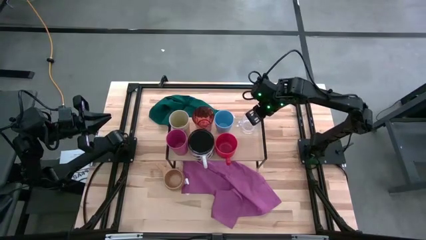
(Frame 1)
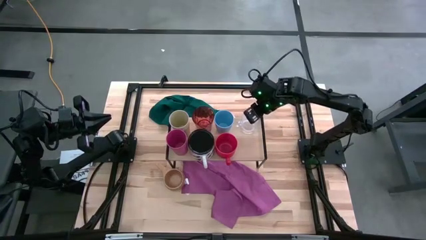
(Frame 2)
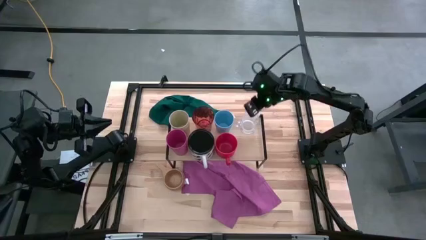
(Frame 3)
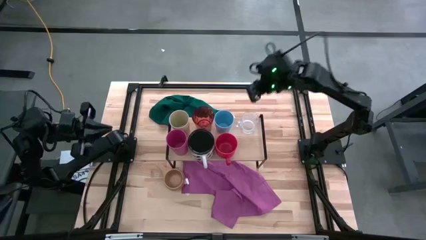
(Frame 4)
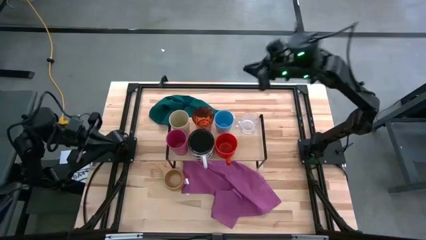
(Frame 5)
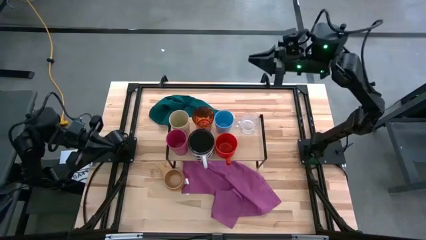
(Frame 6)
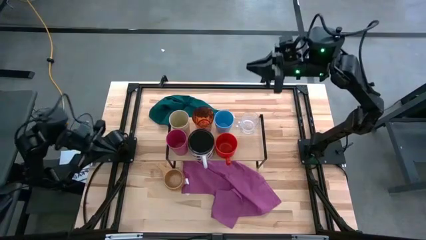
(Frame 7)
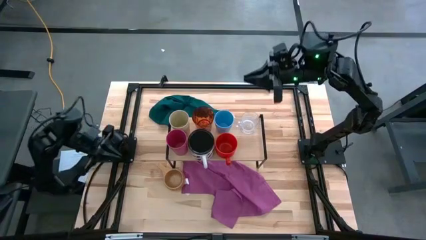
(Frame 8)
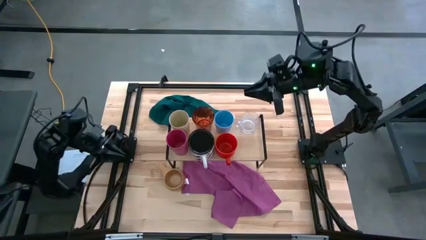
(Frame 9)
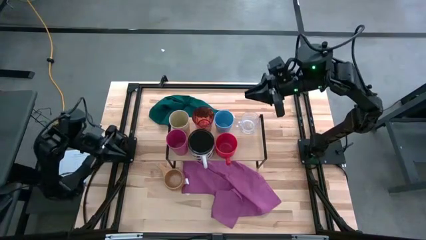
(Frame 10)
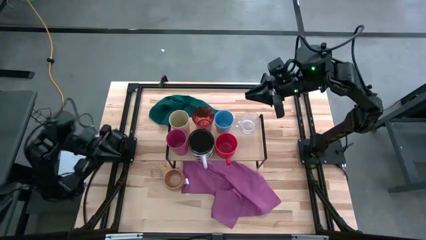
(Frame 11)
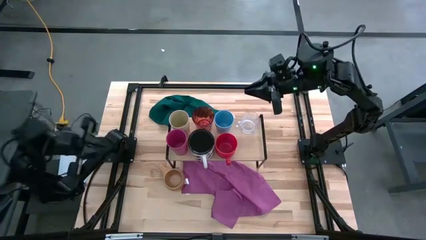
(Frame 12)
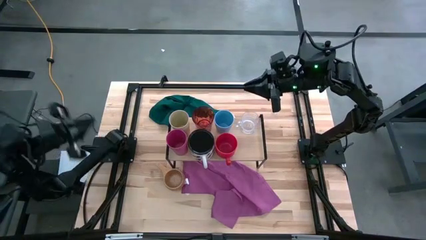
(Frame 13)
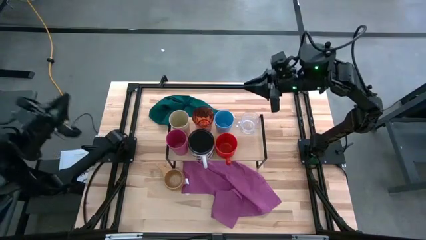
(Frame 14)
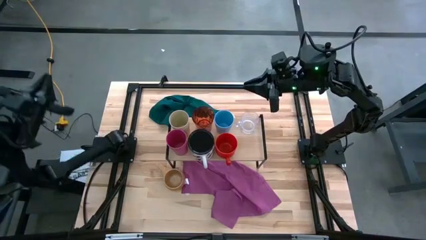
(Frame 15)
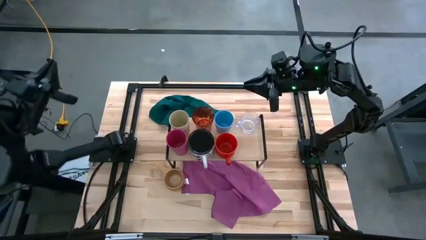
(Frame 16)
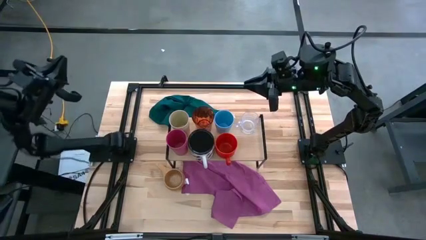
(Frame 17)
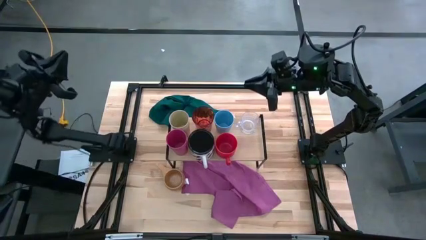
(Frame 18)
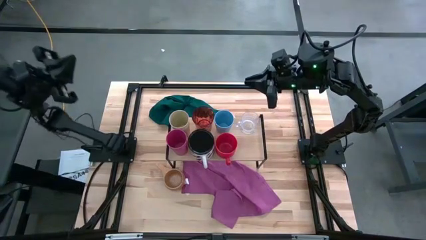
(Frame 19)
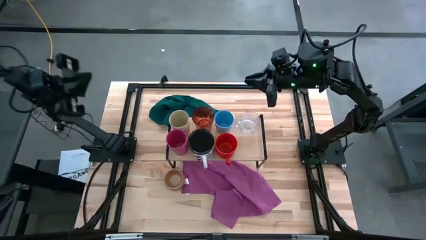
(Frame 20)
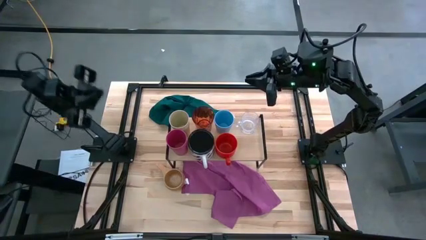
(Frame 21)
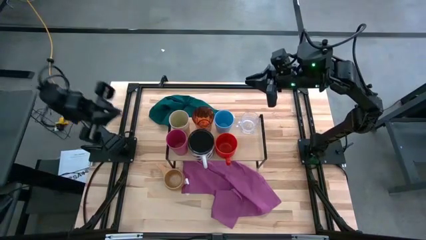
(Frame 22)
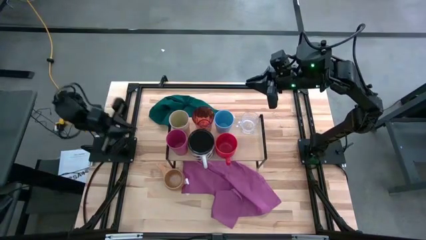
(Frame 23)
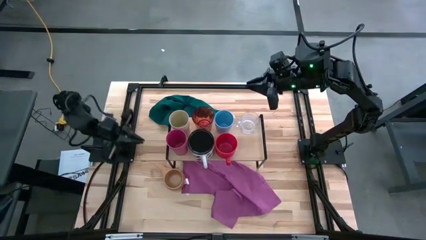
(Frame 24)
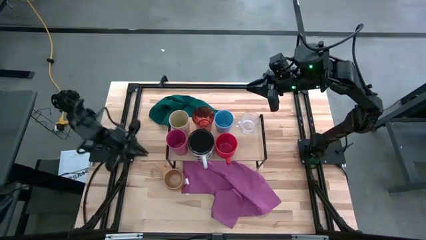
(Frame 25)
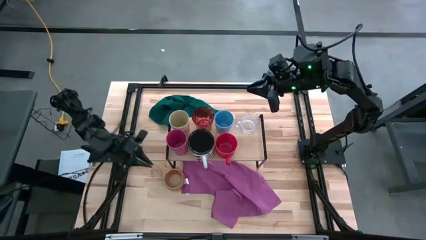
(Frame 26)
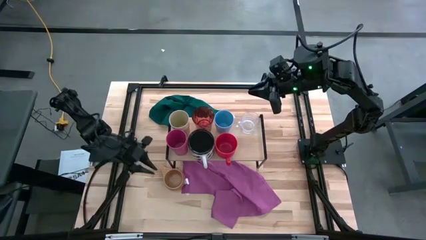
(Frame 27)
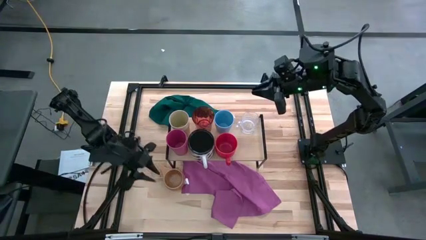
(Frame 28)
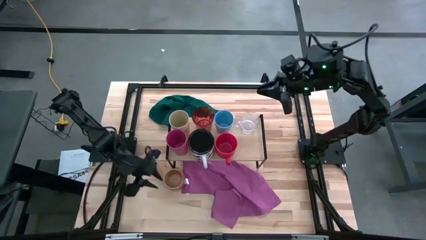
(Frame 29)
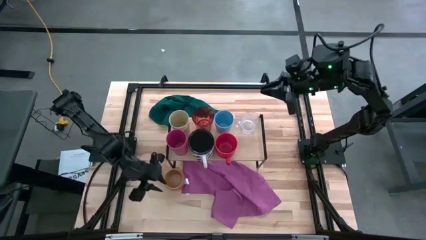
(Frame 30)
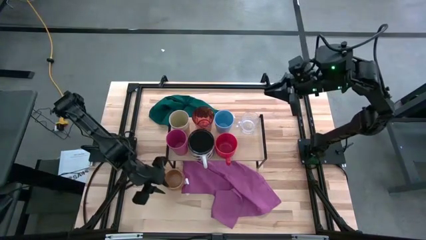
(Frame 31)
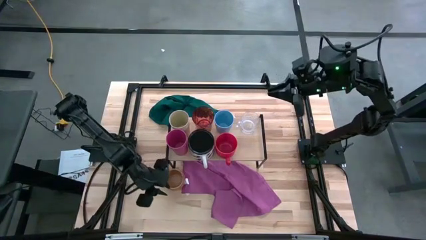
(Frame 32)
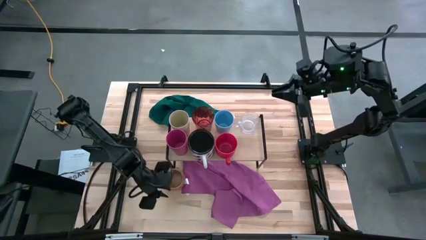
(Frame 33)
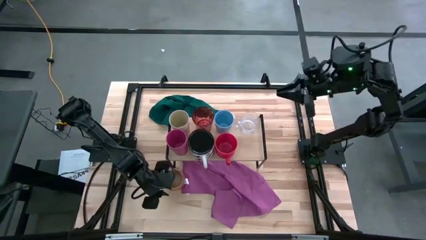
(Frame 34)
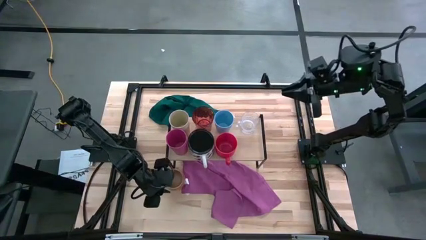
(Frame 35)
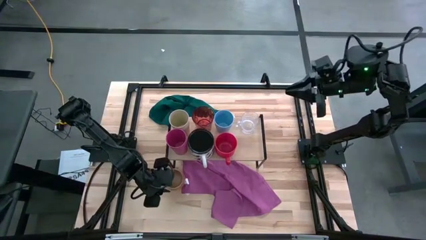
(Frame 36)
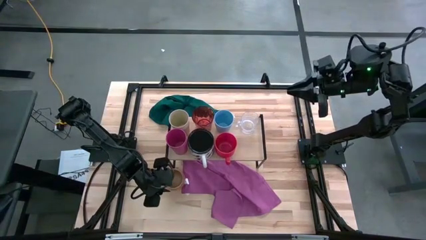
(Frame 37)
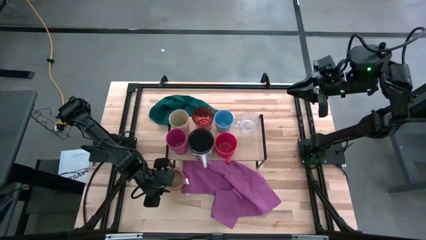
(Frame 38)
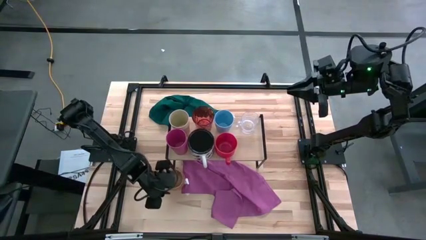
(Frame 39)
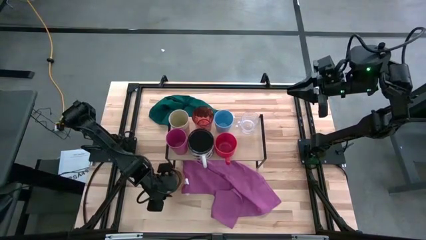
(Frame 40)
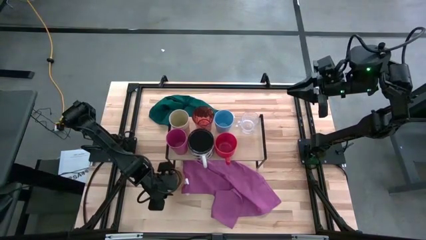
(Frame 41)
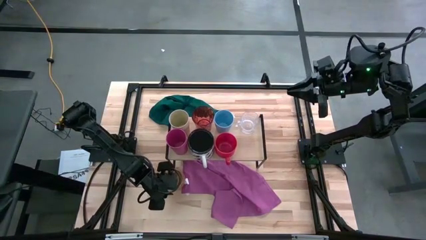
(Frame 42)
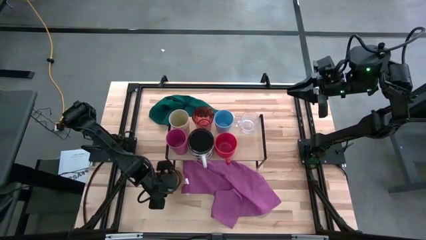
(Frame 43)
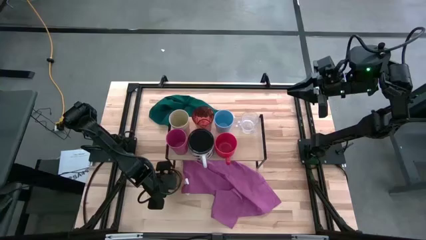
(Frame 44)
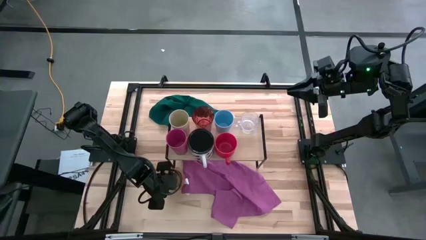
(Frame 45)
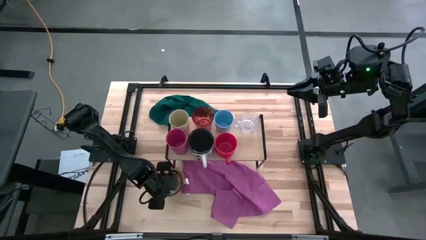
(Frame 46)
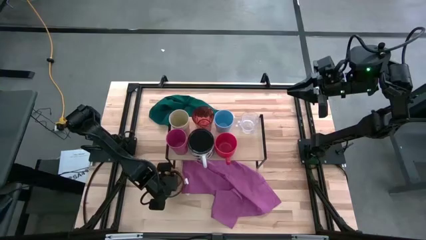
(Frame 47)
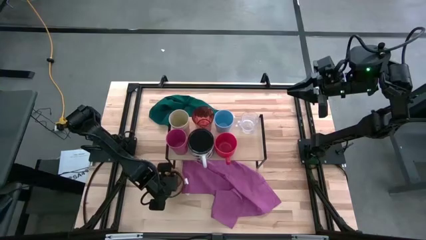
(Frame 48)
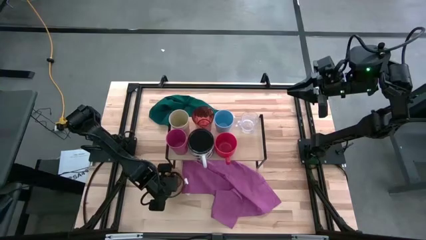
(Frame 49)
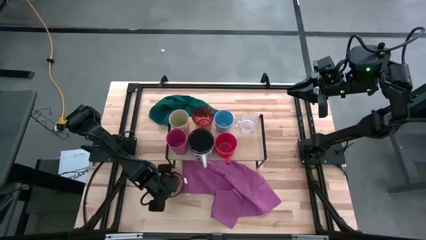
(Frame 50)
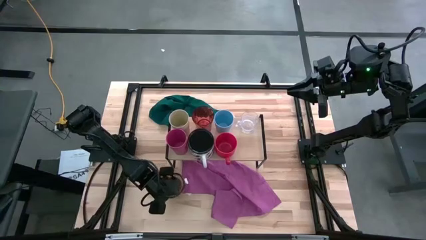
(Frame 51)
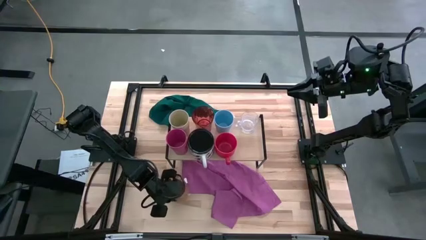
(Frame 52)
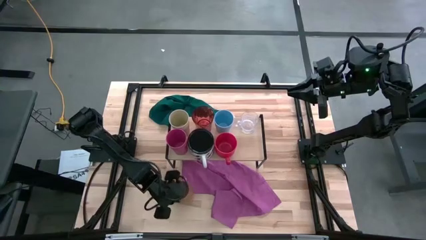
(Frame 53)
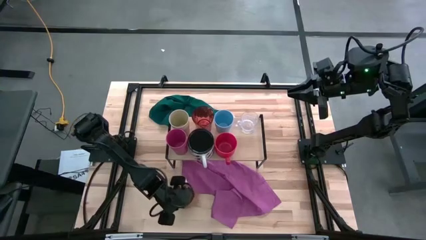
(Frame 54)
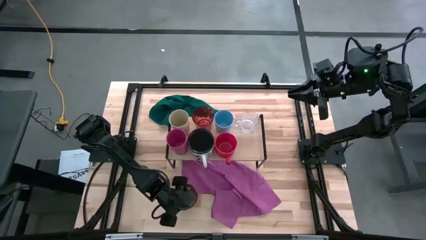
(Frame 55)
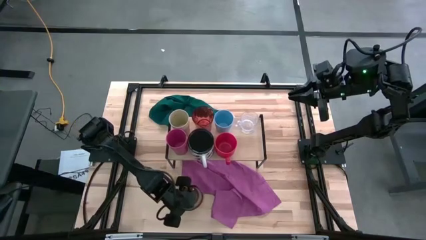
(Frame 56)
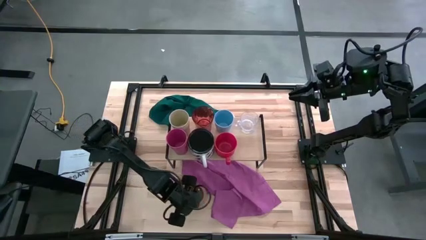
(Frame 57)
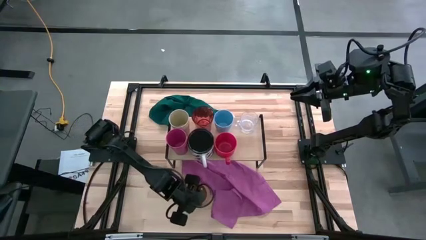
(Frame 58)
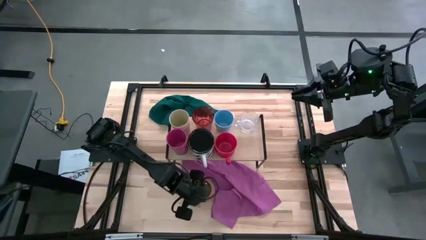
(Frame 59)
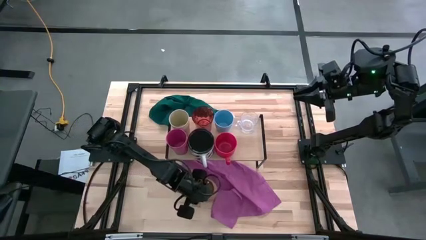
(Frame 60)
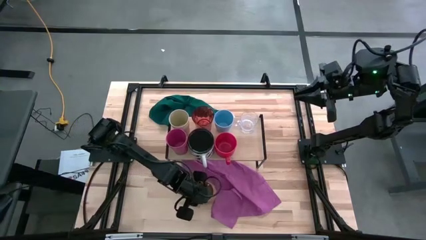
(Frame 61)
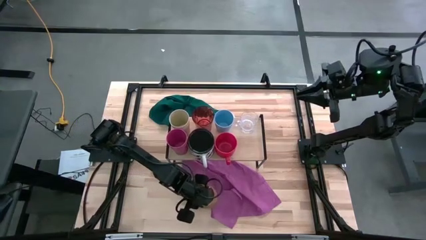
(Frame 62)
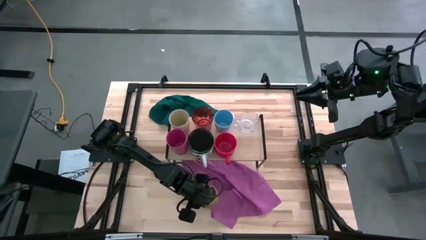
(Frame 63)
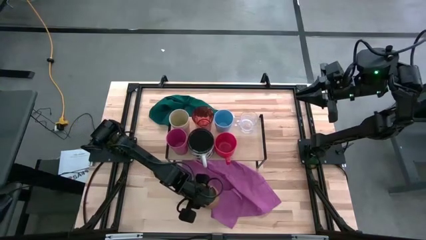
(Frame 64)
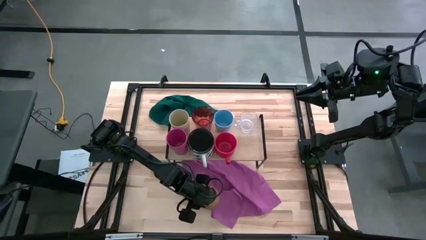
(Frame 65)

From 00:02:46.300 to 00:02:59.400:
Task: Stack small to large cups/mugs on shelf
Put the brown mug on the shelf

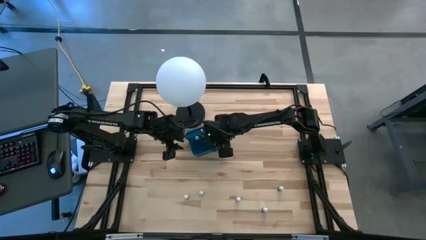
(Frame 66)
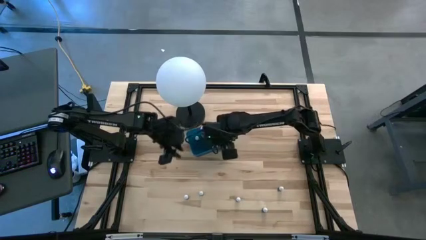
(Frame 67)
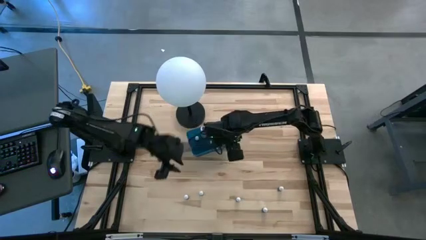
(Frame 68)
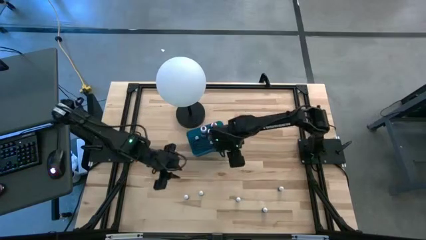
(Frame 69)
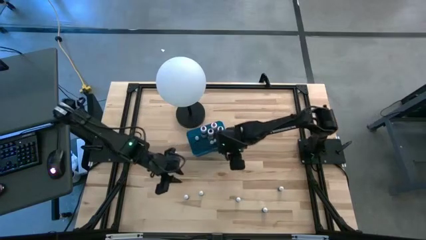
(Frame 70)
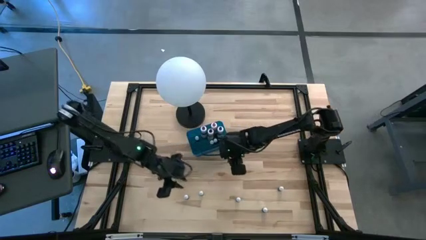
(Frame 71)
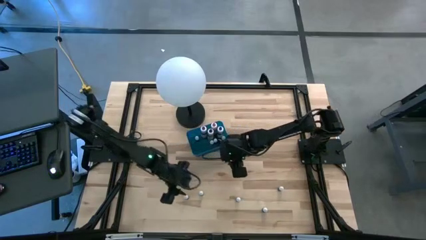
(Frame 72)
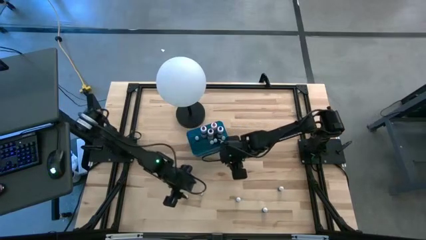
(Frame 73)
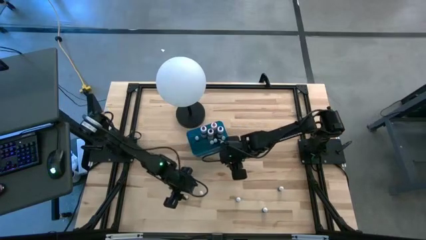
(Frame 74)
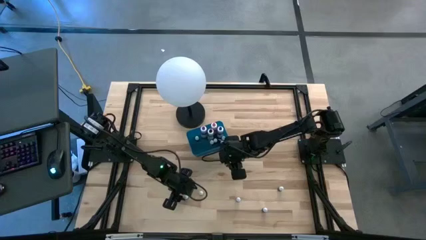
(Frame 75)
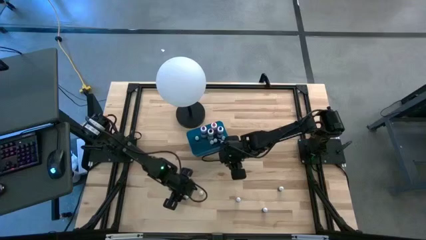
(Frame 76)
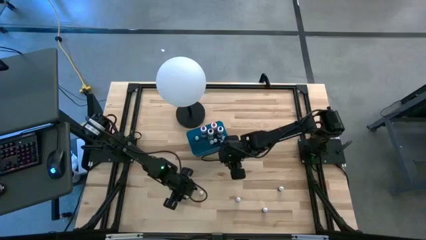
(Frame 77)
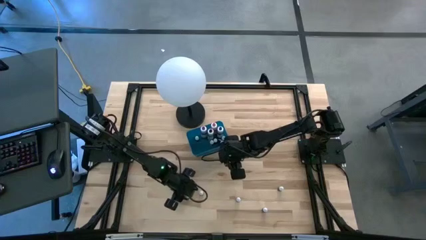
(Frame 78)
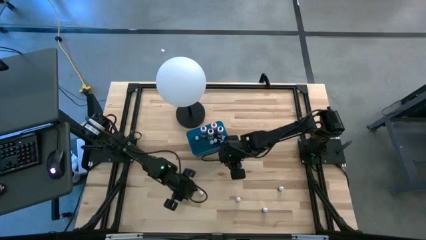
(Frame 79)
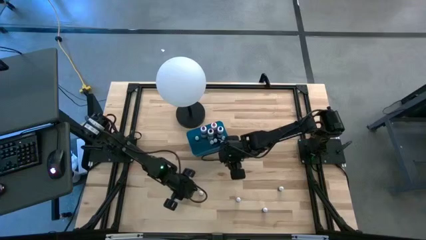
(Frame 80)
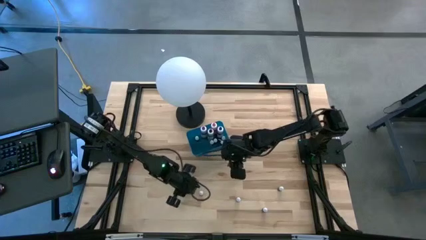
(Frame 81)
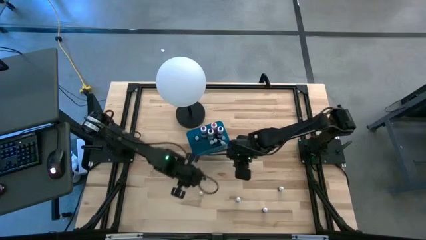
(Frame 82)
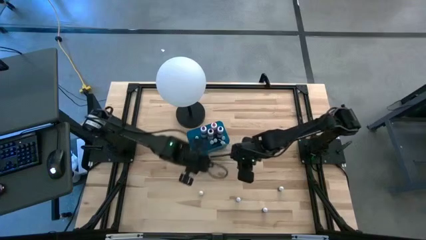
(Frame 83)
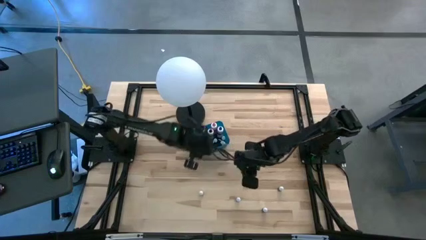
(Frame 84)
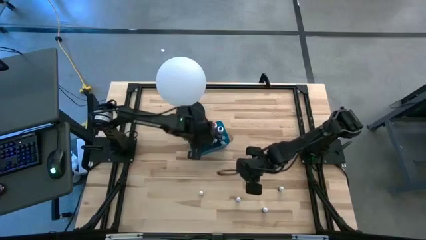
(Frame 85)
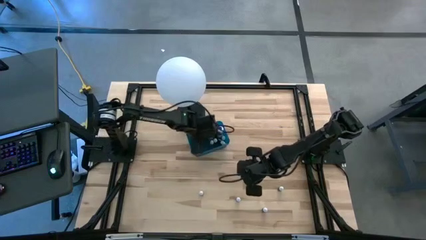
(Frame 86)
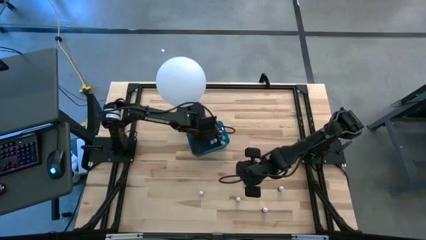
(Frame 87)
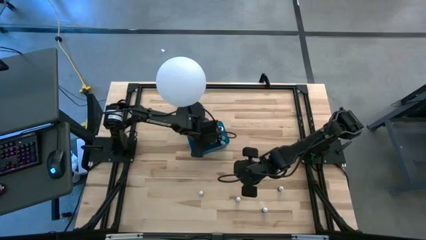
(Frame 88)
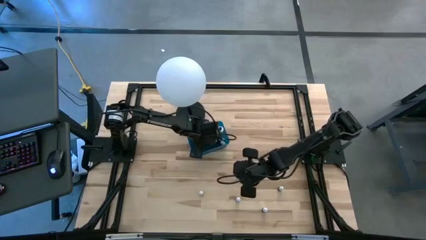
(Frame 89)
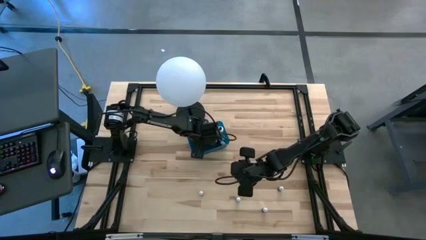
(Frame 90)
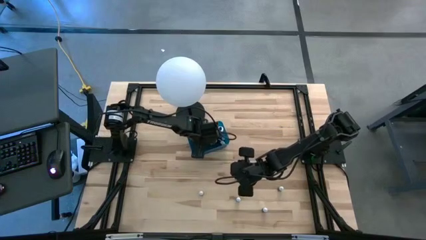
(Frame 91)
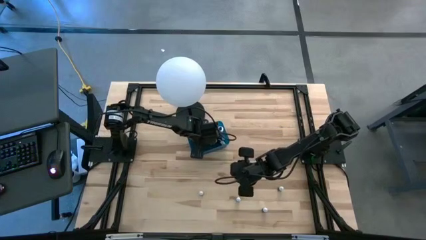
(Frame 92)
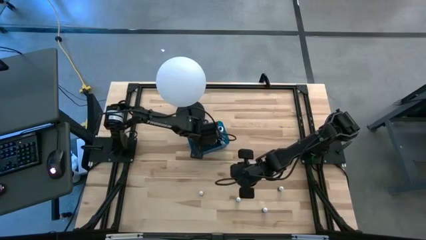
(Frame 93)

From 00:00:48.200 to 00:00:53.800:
Task: Pick & Place food coloring
Put the small black food coloring bottle into the blue container
